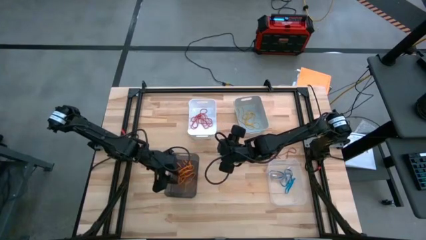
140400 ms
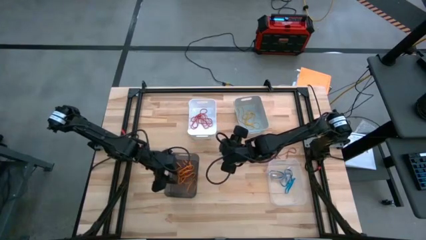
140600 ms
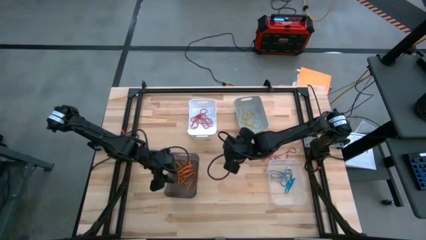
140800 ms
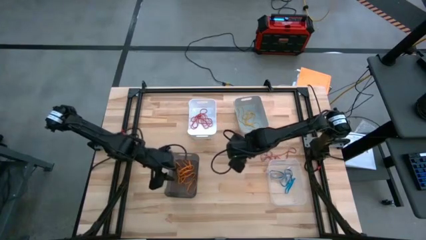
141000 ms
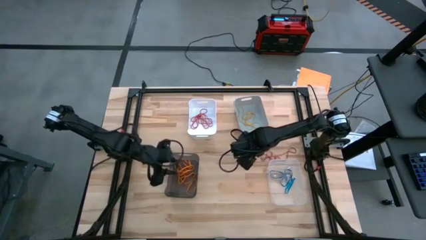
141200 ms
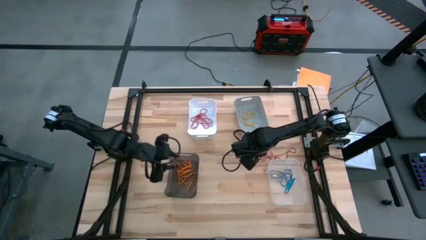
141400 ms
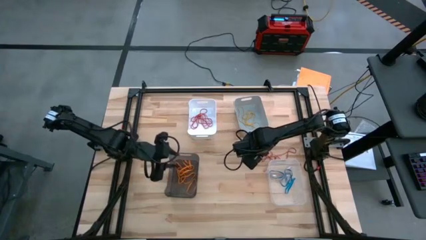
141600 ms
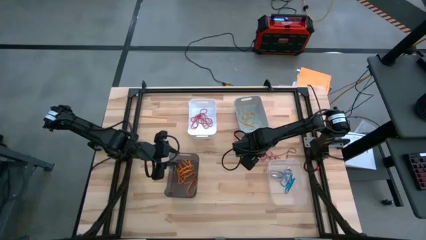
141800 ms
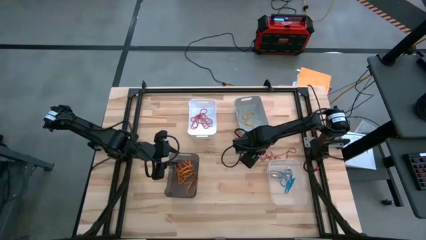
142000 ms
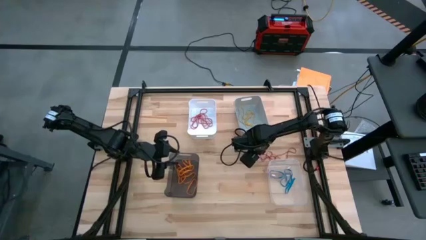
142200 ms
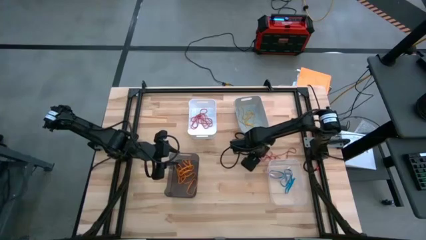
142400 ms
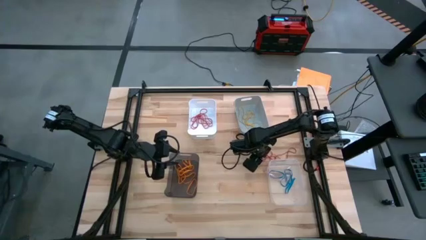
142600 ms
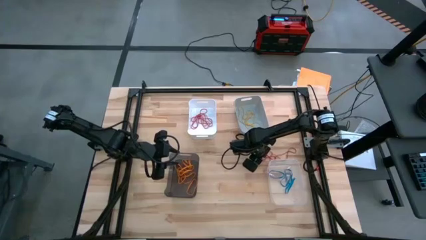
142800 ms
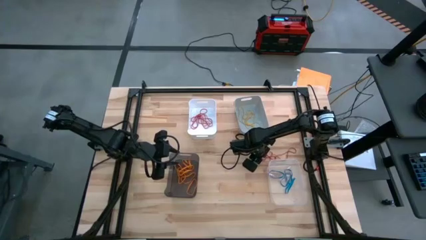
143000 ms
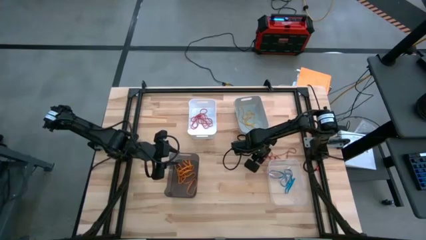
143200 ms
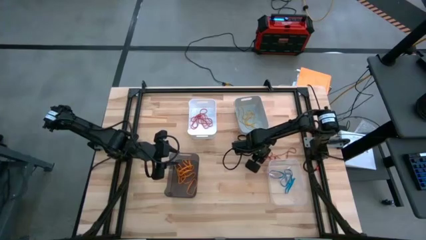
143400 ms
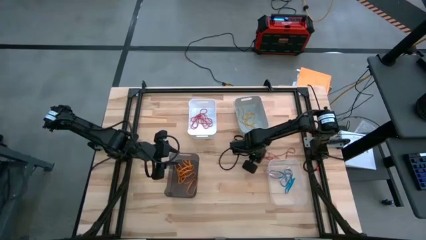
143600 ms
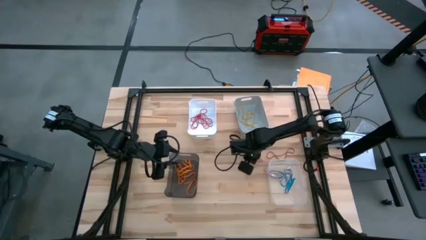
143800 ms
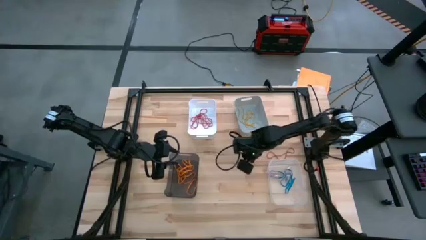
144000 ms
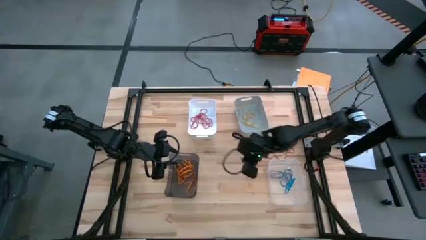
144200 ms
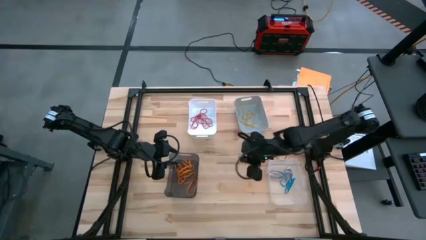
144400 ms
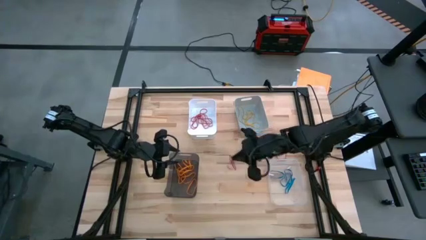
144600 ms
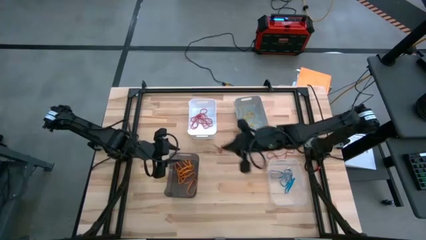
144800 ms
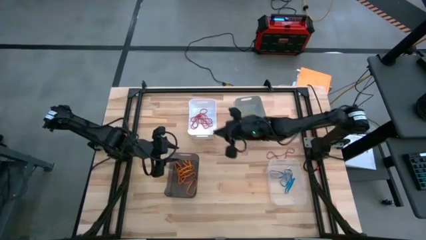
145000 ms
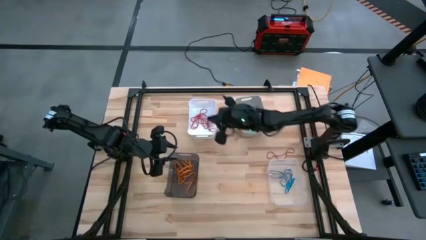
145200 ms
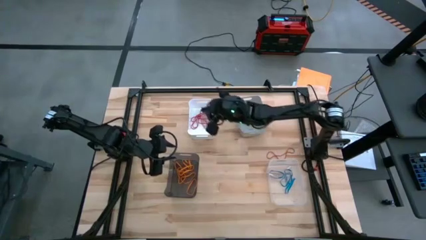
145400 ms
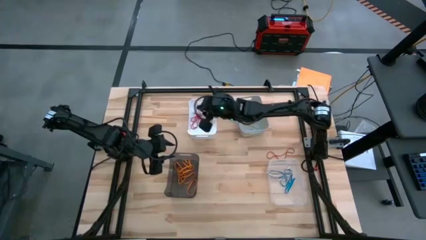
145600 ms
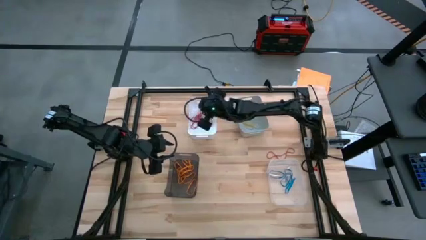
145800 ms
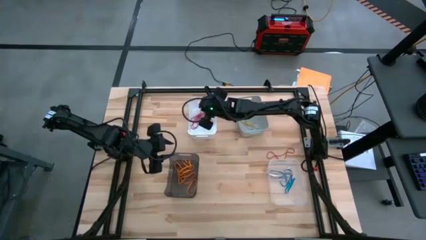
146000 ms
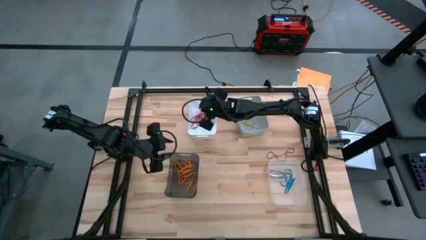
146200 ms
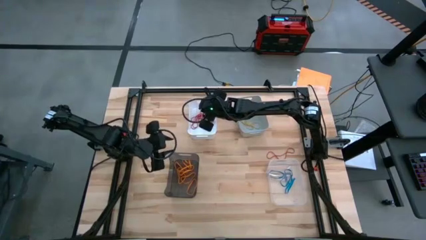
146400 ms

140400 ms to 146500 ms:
Task: Sort rubber bands into baskets
Put the red rubber band into the white bin

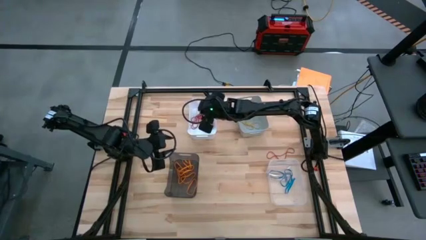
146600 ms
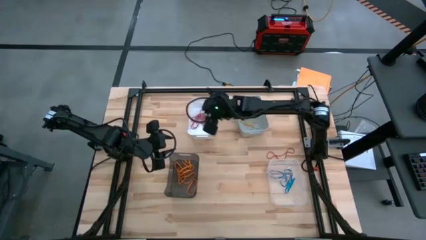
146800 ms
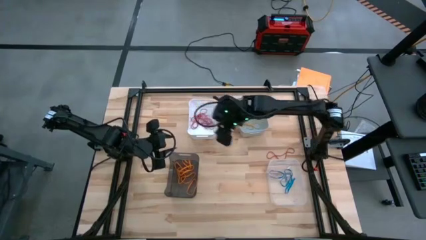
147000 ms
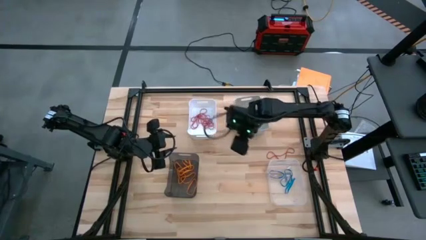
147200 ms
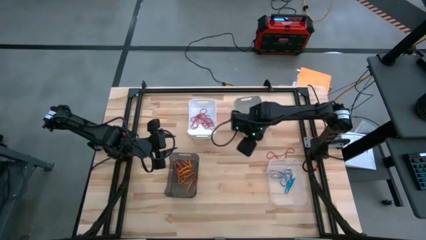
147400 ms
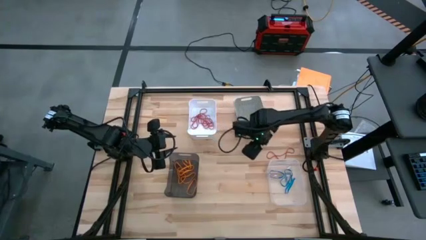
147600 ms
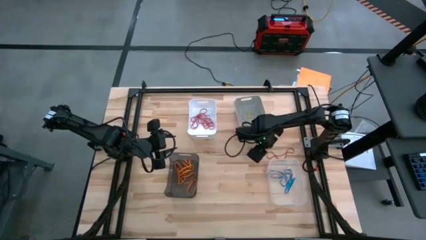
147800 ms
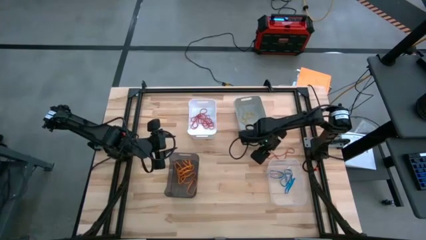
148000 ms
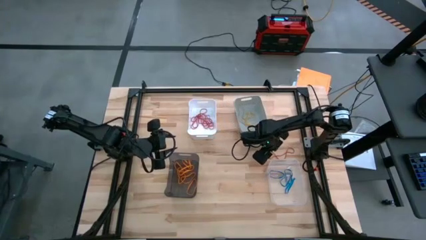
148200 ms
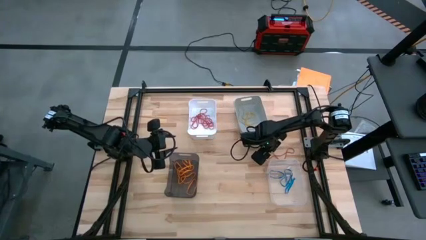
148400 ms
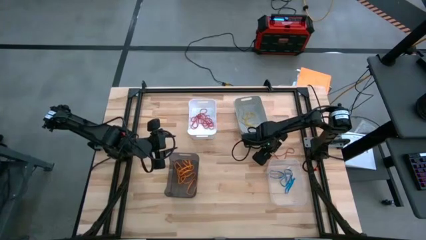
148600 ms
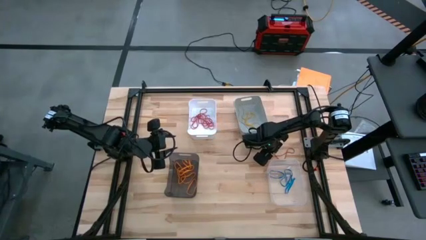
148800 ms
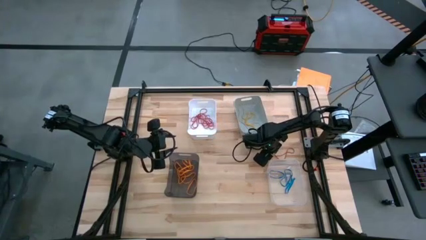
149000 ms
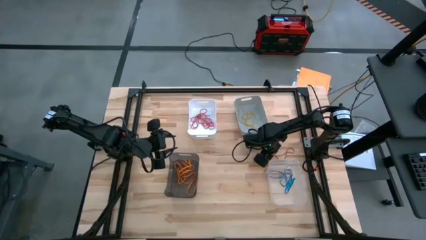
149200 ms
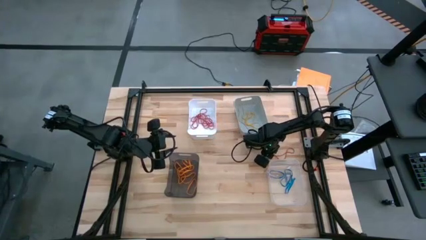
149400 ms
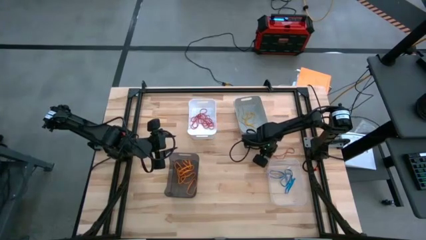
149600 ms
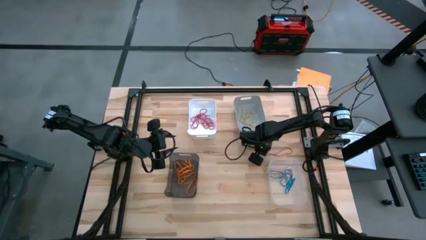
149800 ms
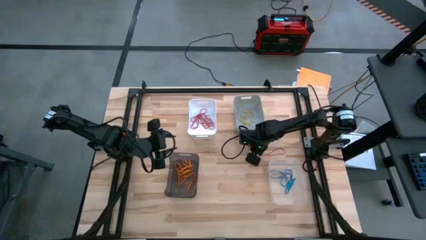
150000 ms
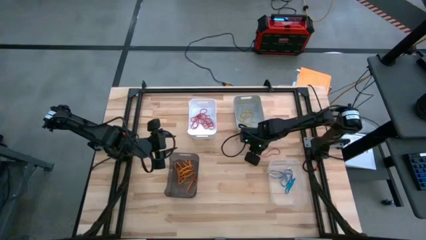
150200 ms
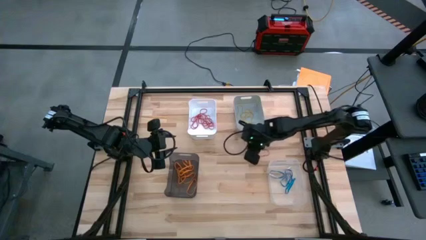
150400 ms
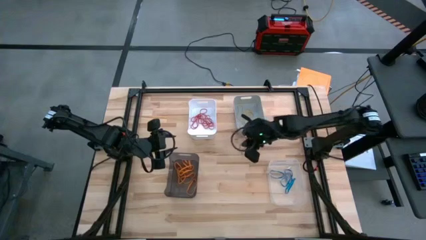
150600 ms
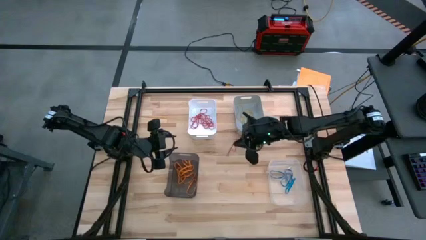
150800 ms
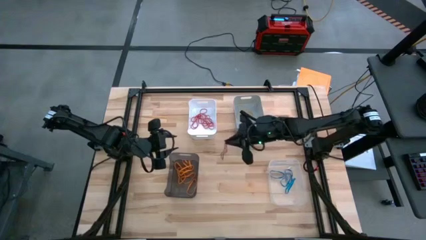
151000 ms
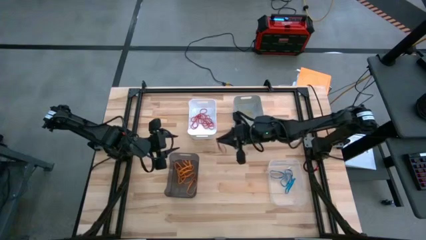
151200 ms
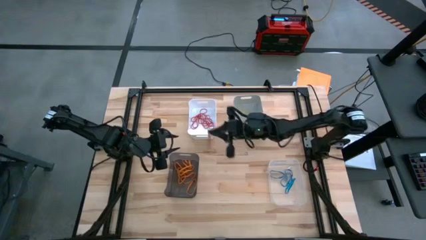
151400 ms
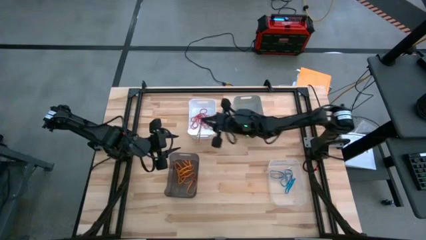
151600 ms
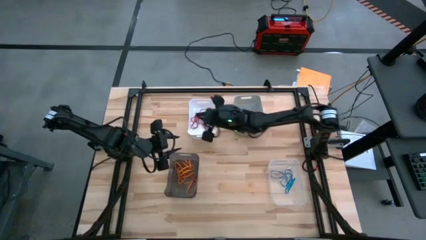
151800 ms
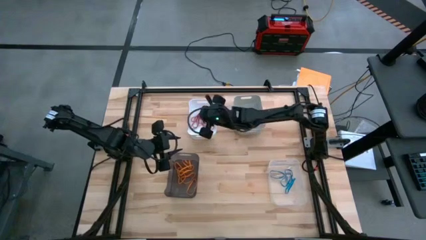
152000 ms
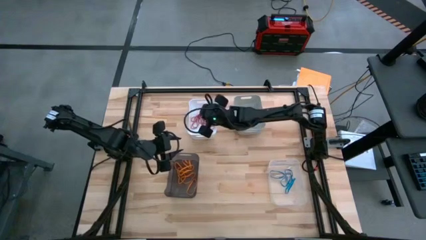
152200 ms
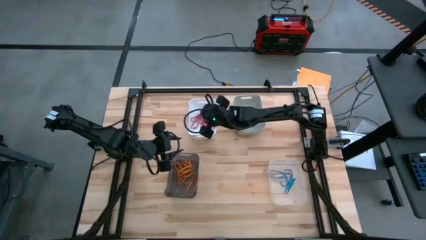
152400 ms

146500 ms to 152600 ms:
Put the red rubber band into the white bin

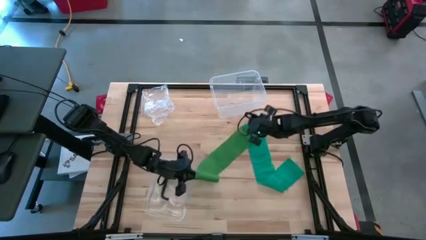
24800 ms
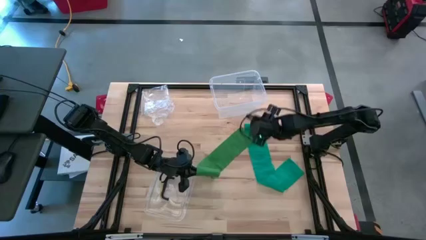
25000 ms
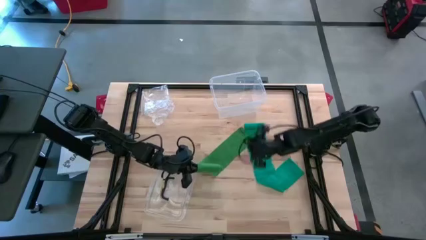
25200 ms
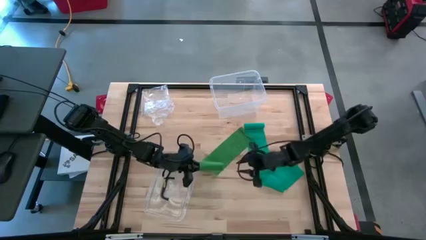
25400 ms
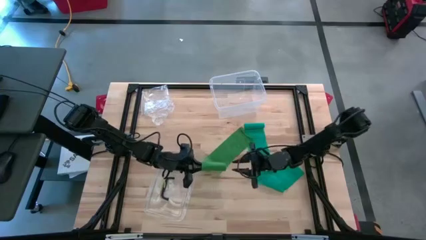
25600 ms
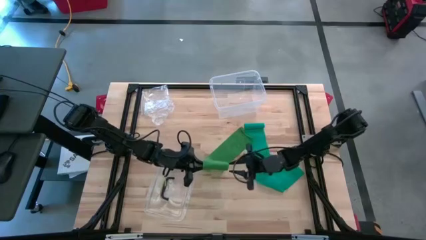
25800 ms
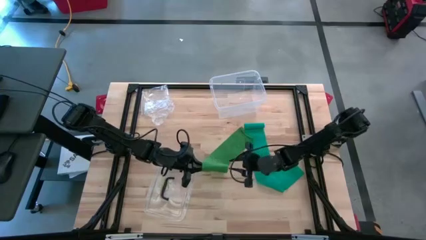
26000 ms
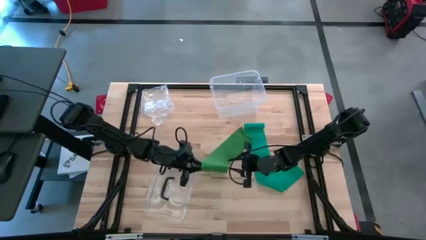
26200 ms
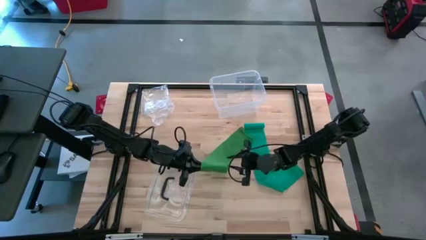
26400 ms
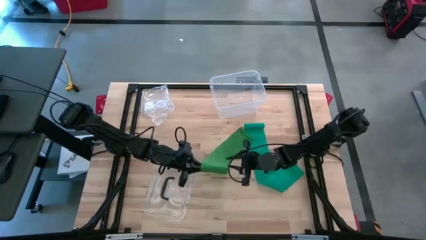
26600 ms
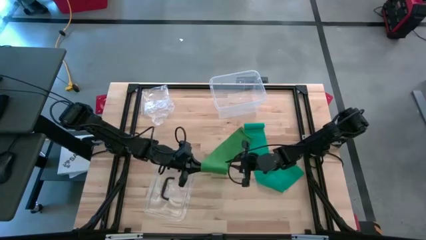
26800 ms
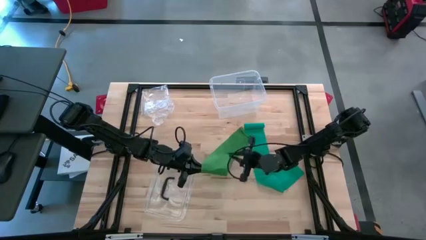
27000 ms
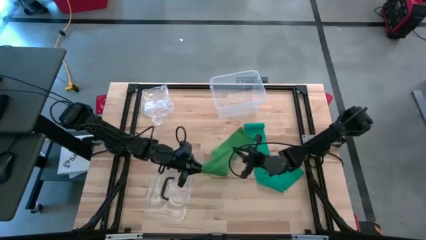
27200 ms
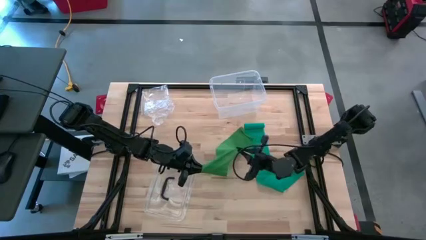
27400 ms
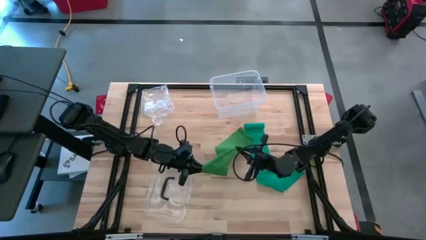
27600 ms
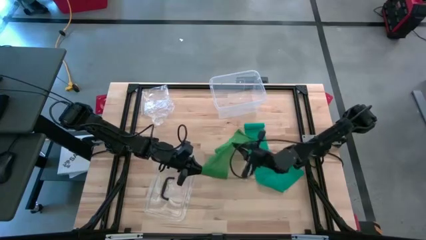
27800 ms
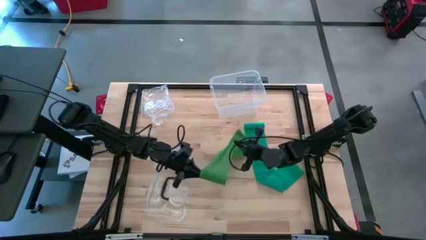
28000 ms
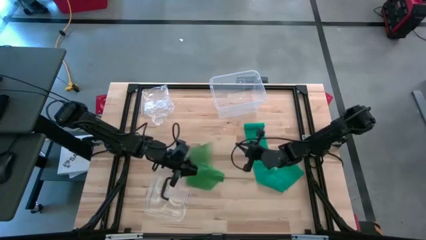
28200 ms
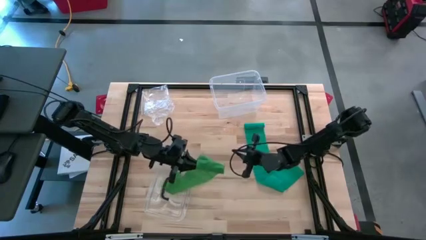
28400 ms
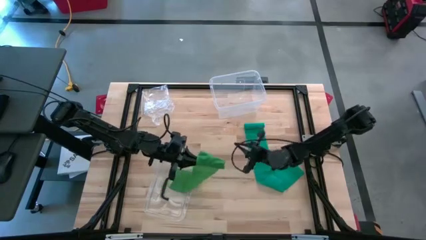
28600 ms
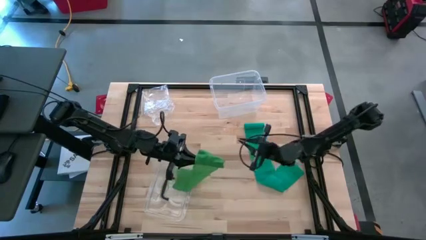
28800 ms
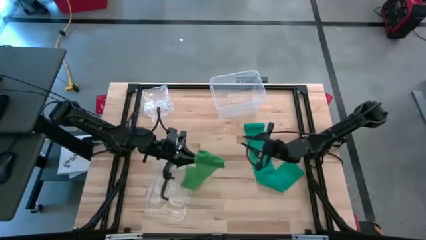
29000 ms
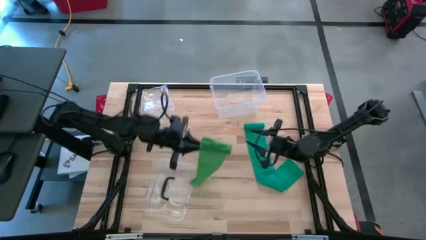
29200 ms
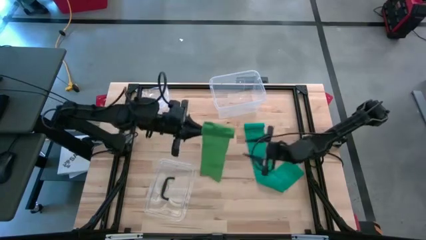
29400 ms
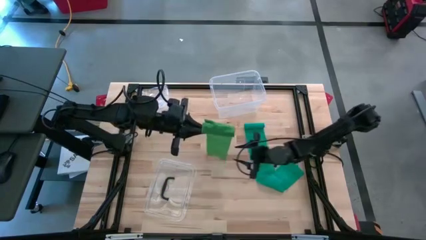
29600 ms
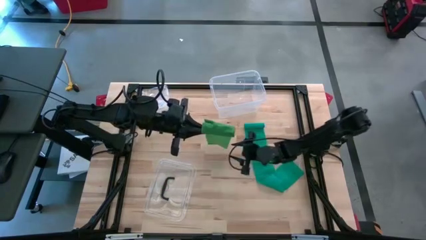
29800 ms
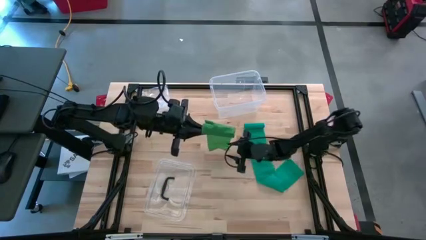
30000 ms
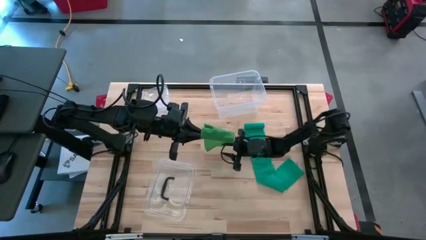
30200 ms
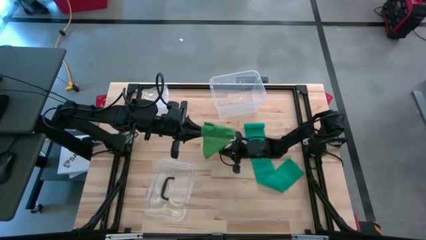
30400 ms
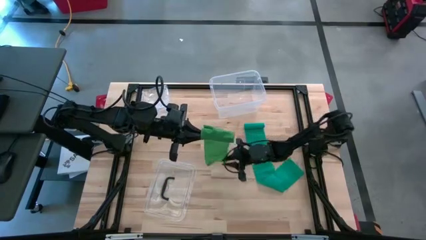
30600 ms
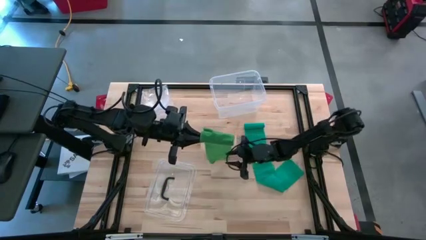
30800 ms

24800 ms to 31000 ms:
Task: Roll bandage
Roll the green bandage
